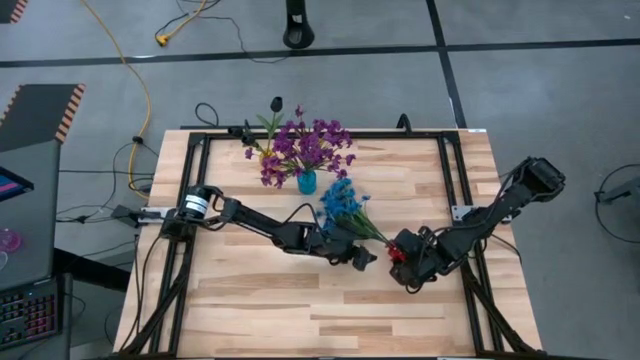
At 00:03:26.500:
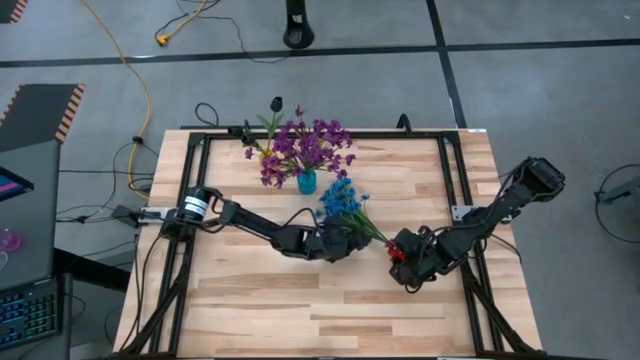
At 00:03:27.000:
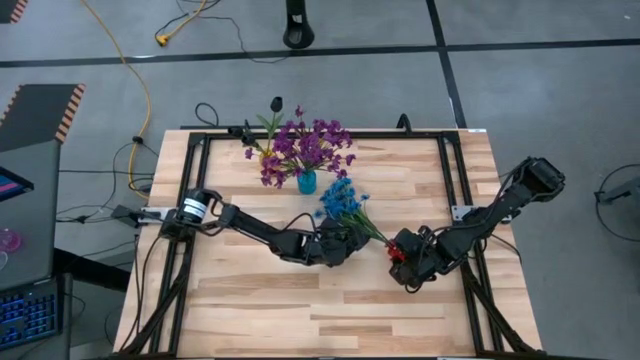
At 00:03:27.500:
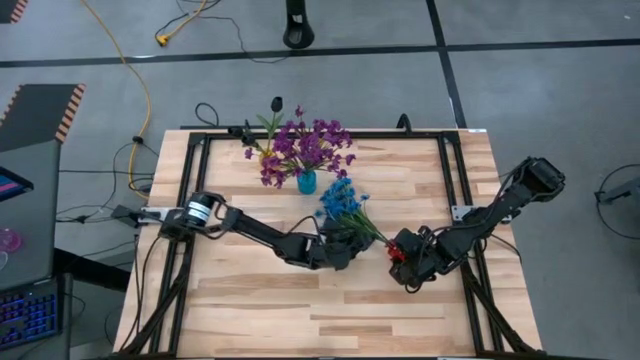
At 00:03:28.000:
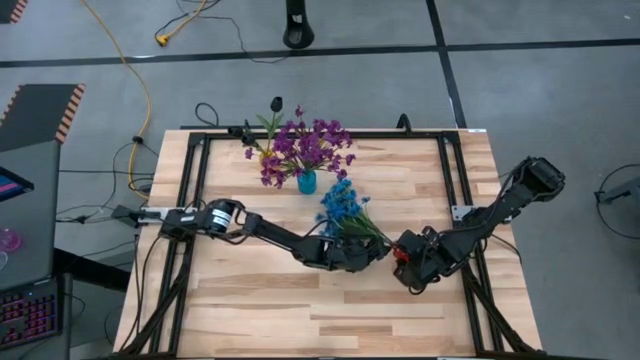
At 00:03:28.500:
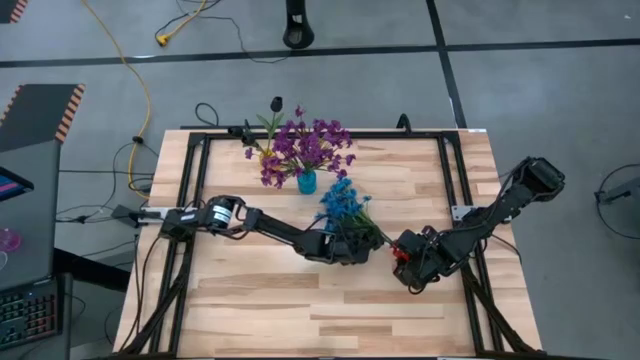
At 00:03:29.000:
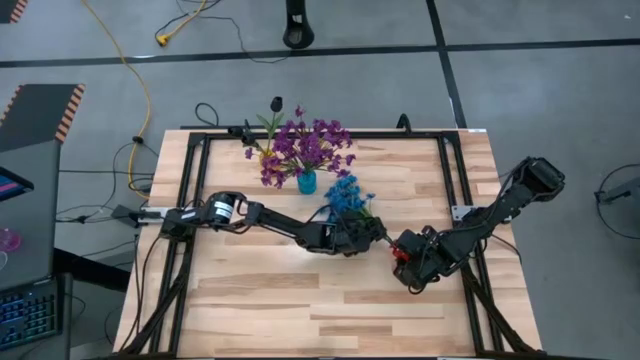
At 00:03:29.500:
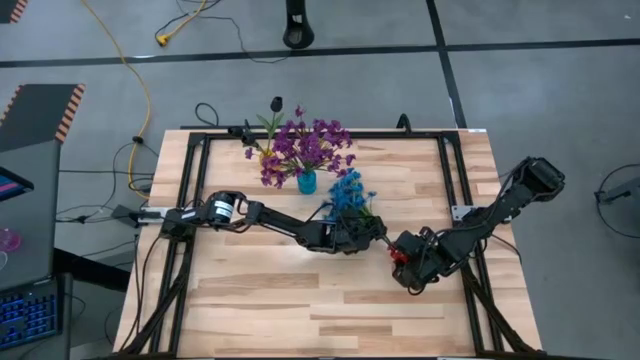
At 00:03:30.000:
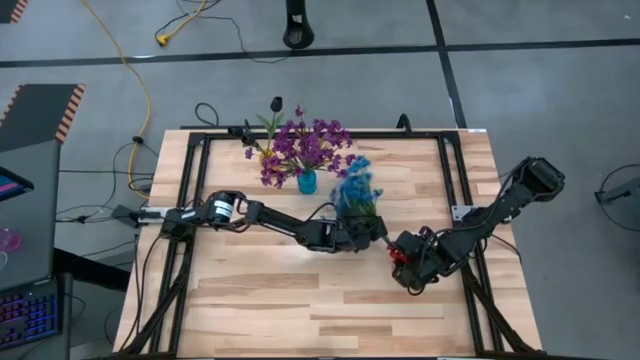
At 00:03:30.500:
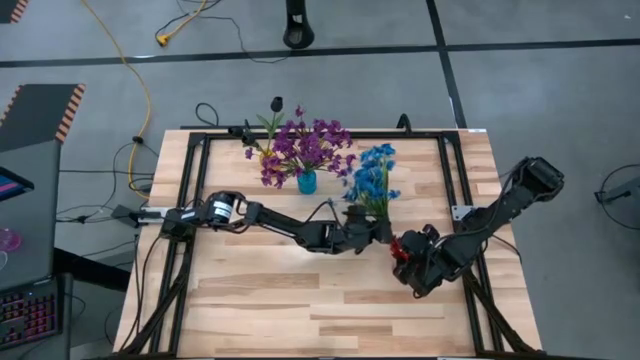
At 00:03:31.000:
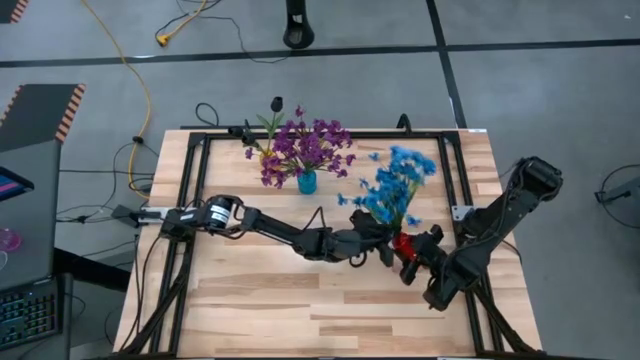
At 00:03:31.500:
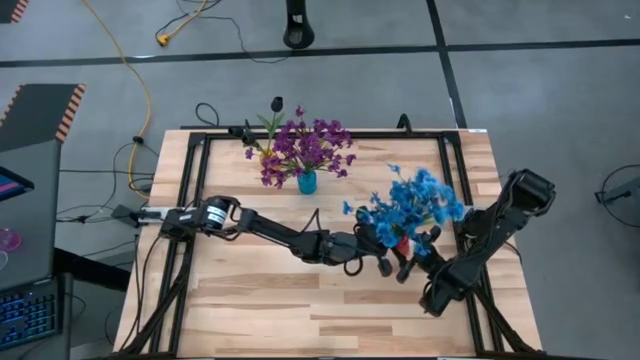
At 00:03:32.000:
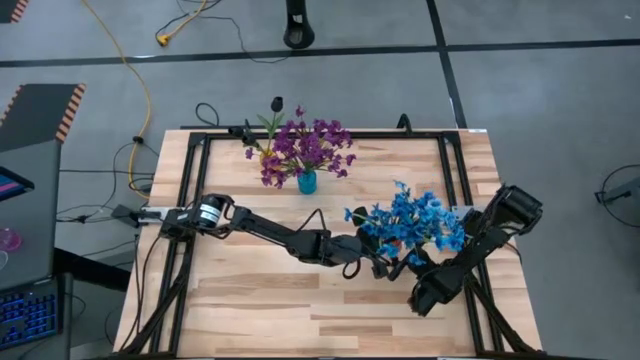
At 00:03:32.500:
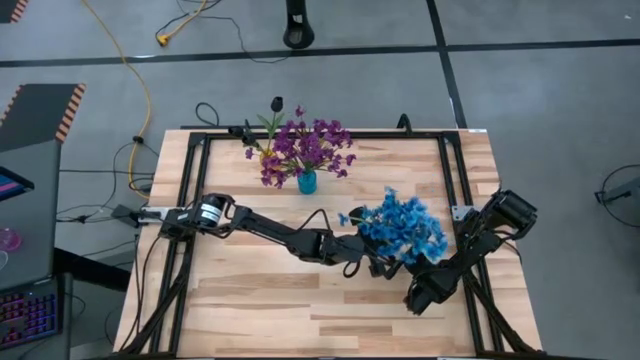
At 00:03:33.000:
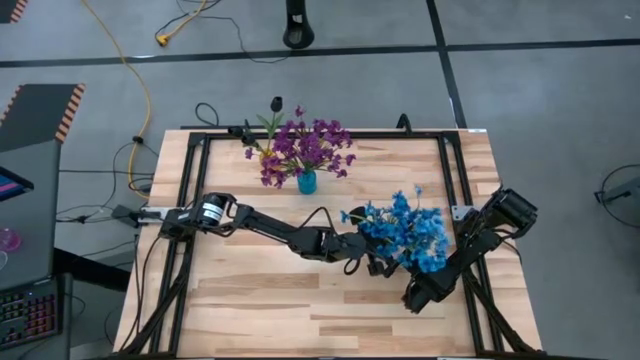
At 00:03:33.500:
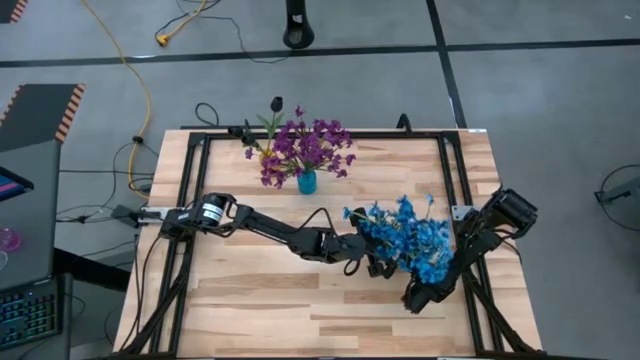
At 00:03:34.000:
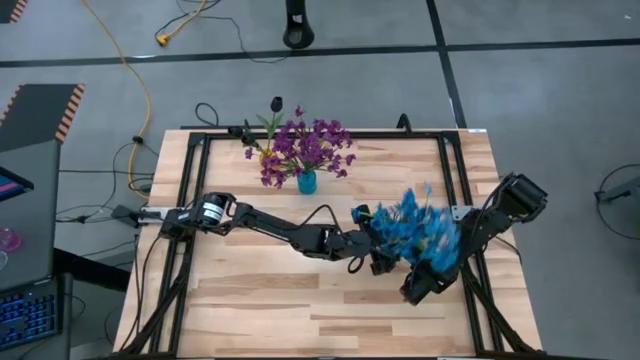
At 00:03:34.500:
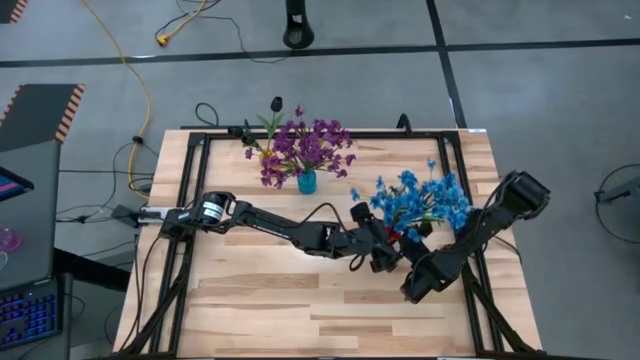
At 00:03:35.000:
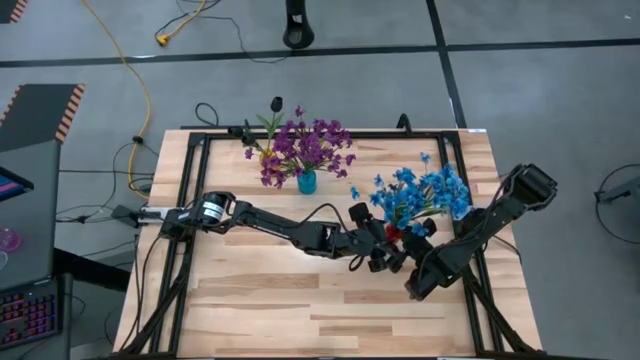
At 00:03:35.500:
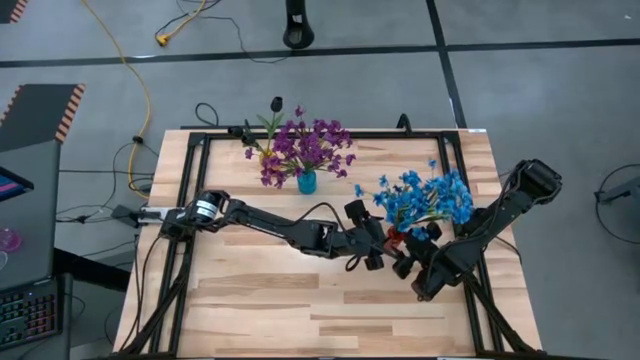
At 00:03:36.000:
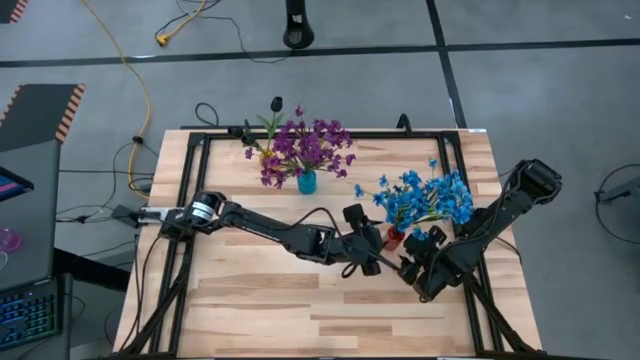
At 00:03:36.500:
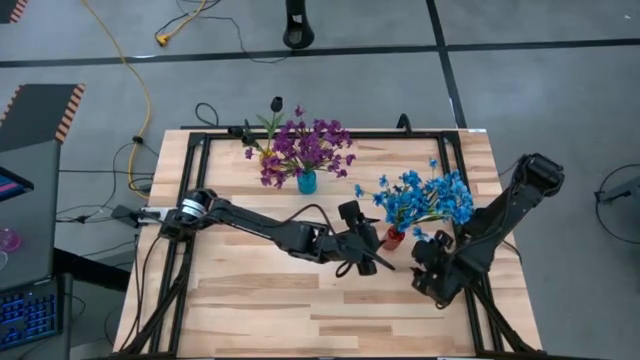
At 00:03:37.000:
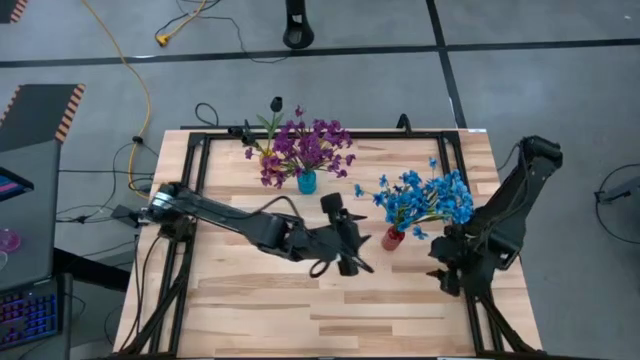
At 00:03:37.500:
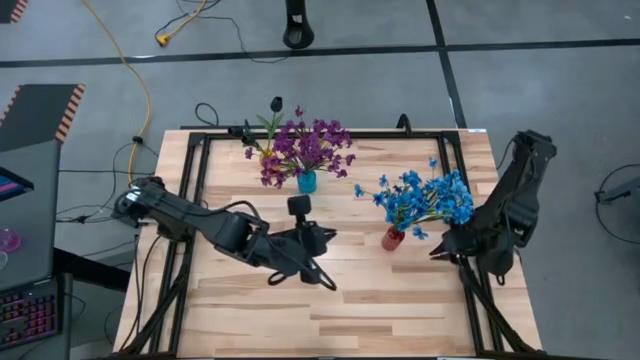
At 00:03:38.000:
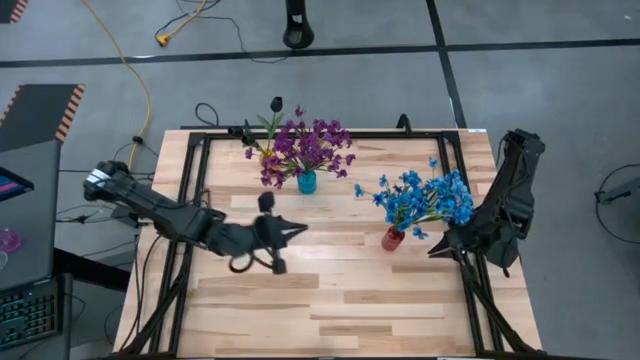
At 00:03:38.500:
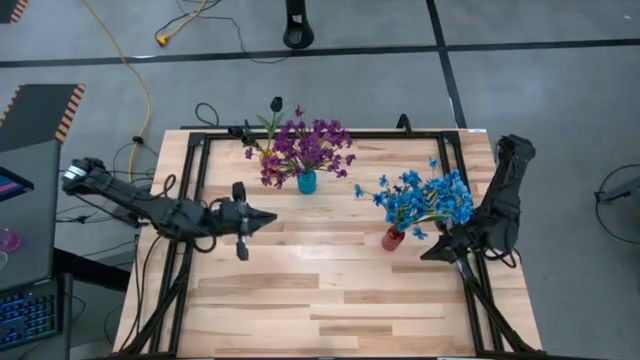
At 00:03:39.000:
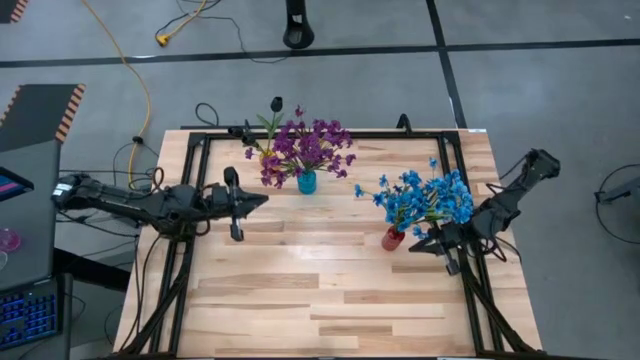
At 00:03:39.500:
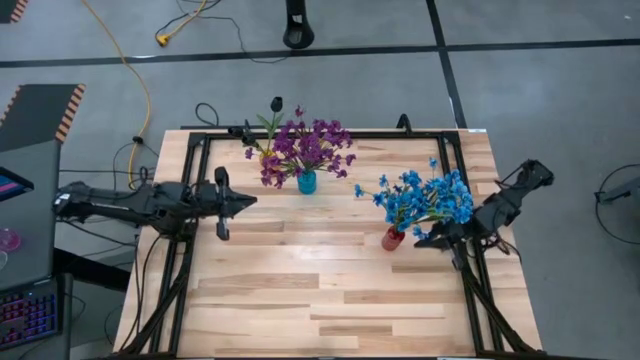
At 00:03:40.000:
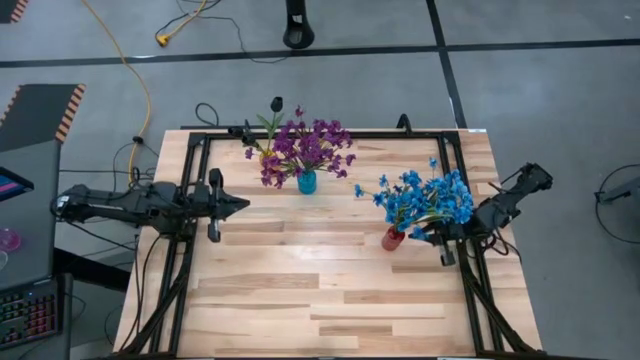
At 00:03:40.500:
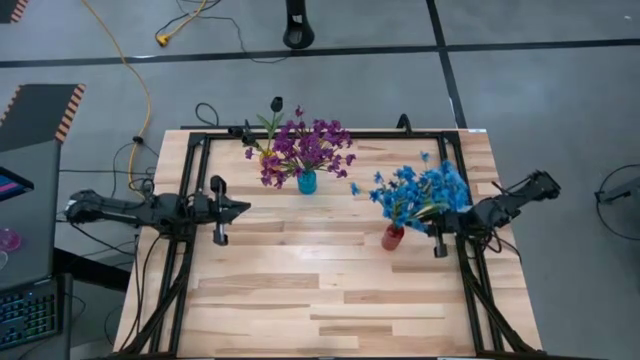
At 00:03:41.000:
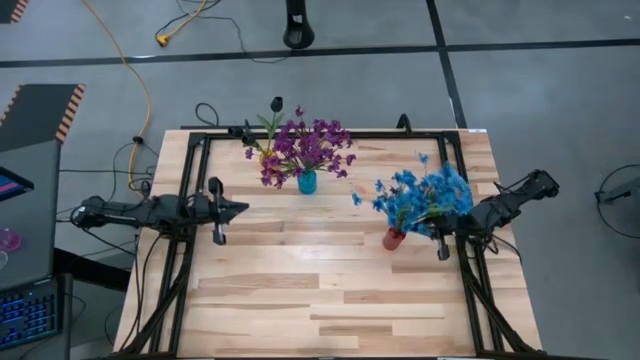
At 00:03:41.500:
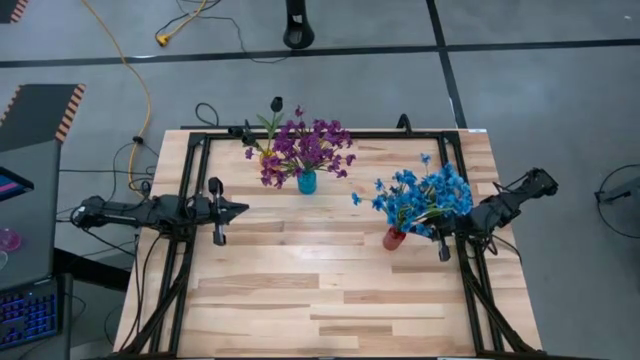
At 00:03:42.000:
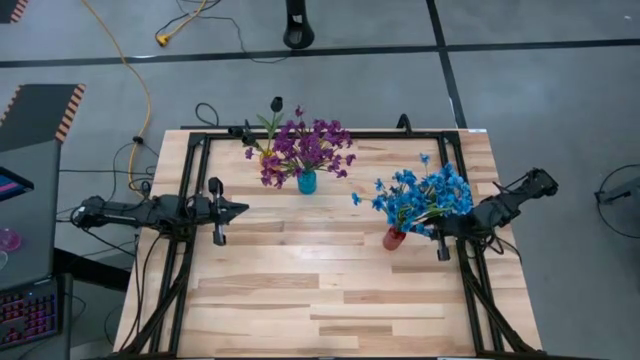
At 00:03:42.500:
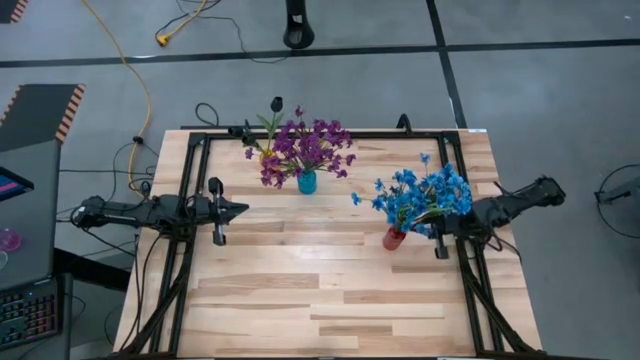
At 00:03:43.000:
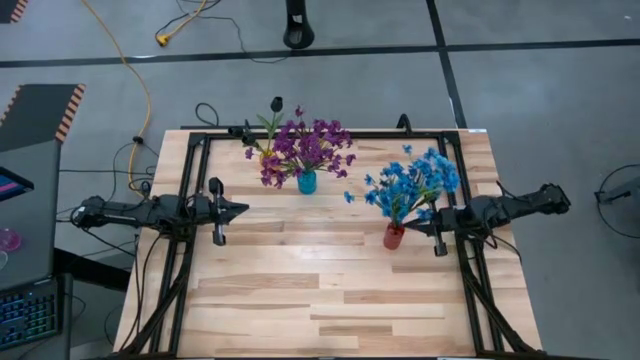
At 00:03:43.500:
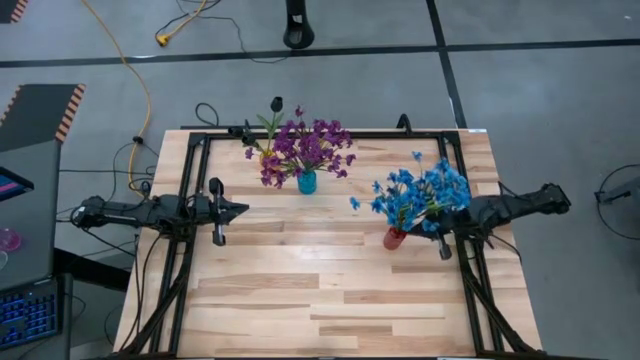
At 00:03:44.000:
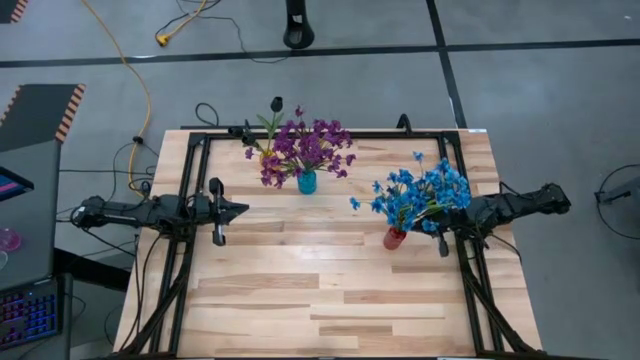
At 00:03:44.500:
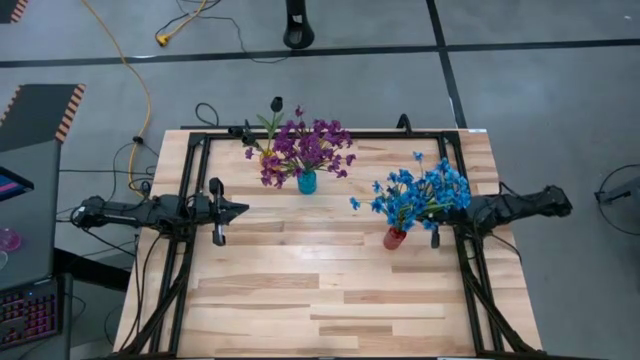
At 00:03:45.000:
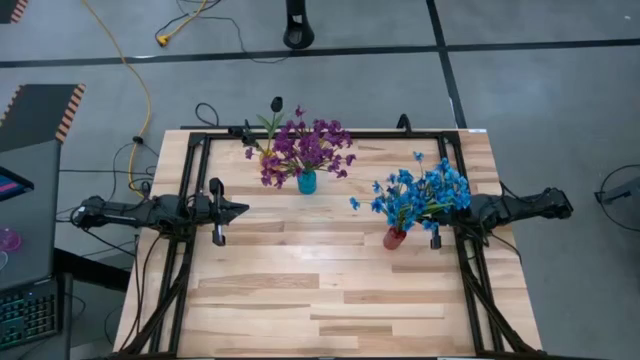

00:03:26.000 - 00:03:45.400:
Task: Sort flowers into vase by color
Adjust the red vase with flowers
